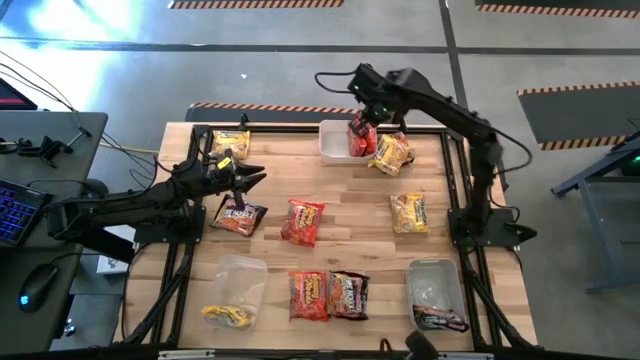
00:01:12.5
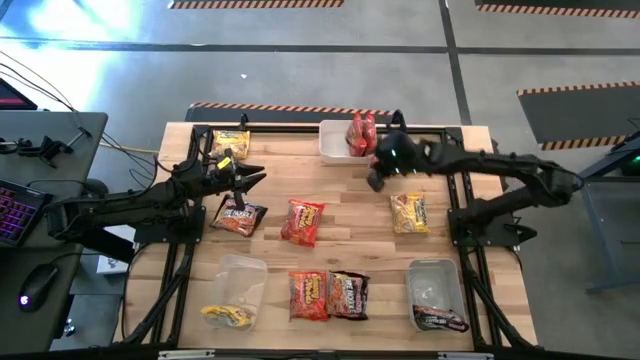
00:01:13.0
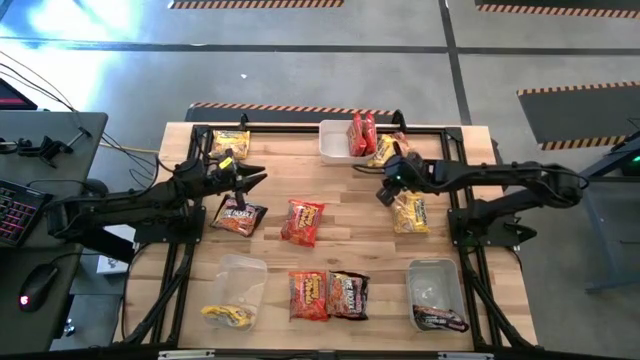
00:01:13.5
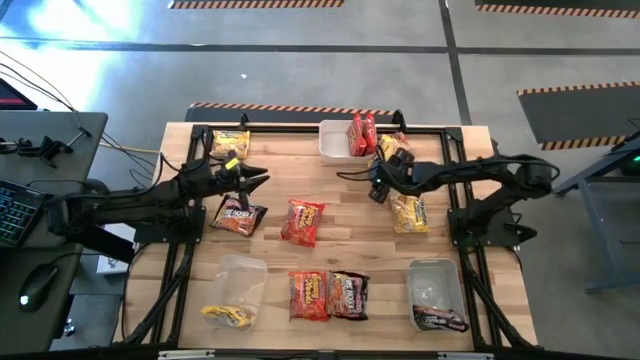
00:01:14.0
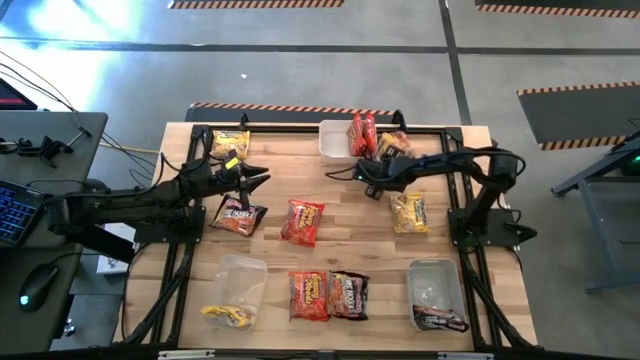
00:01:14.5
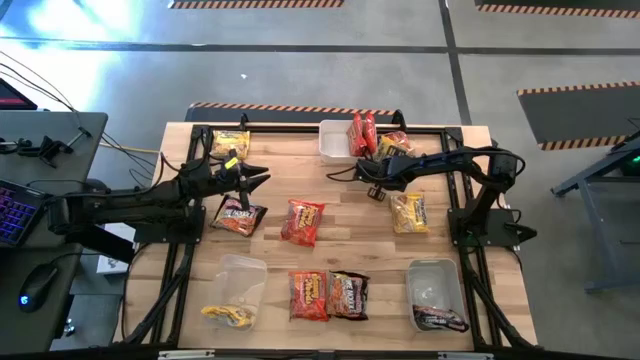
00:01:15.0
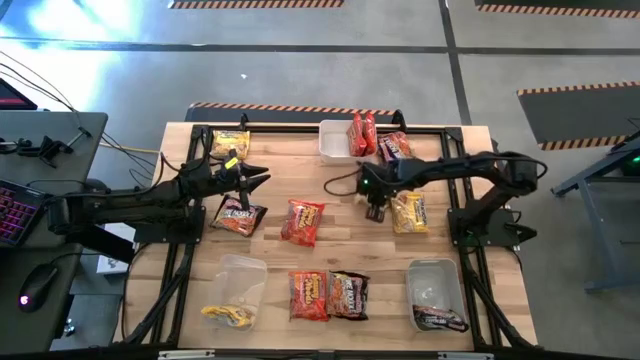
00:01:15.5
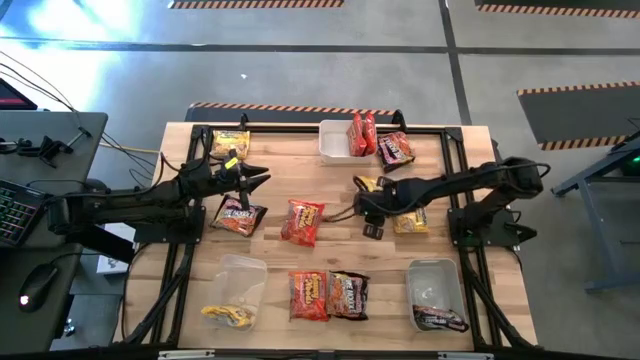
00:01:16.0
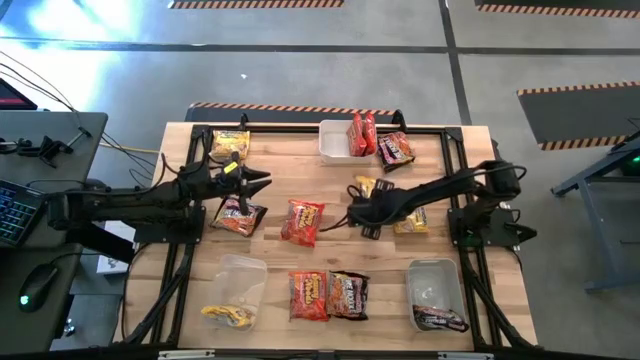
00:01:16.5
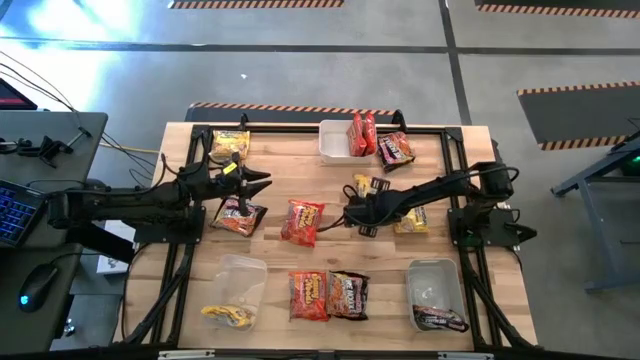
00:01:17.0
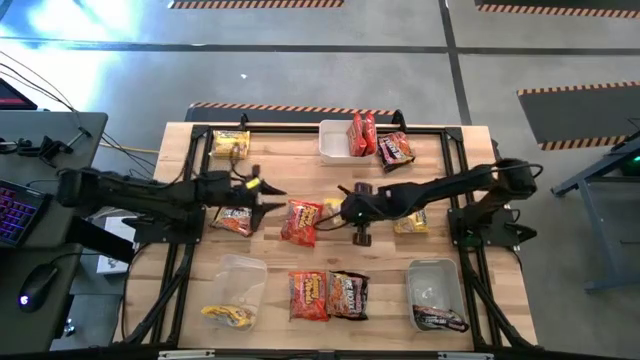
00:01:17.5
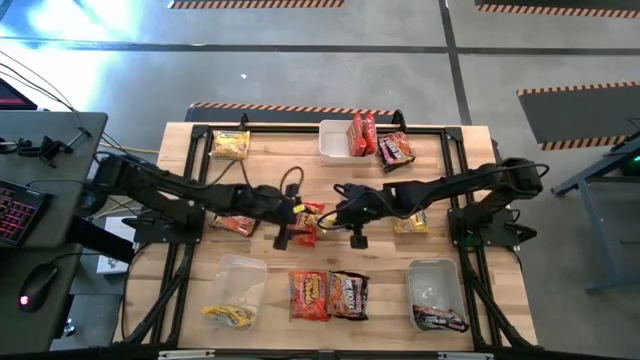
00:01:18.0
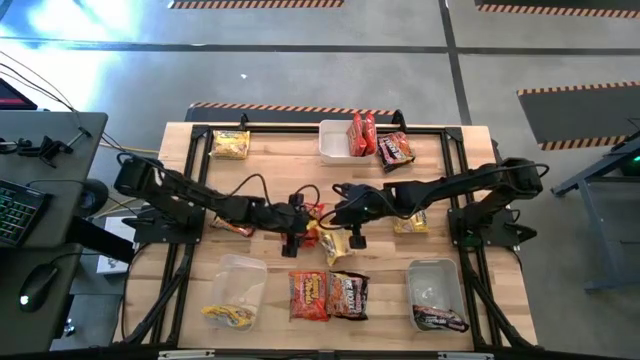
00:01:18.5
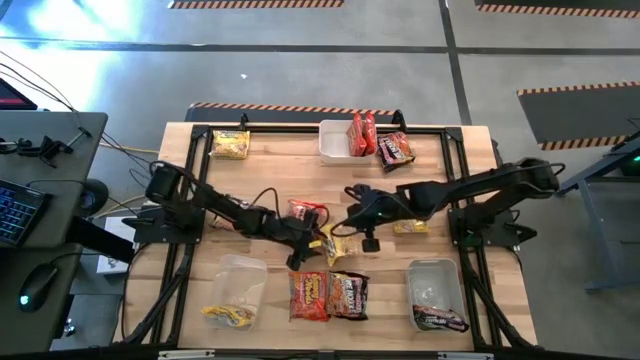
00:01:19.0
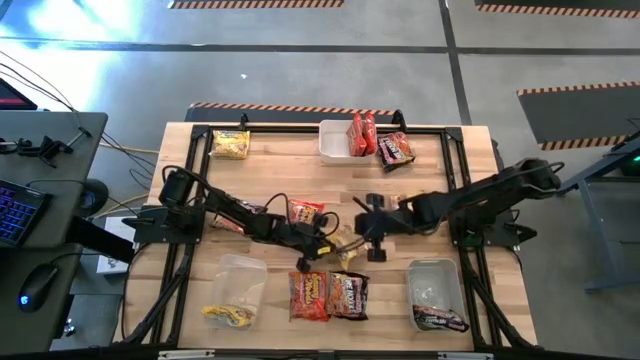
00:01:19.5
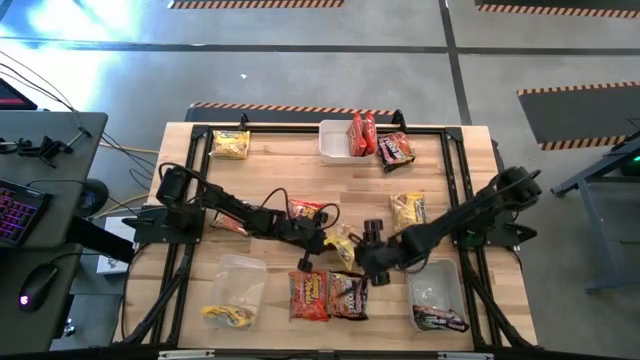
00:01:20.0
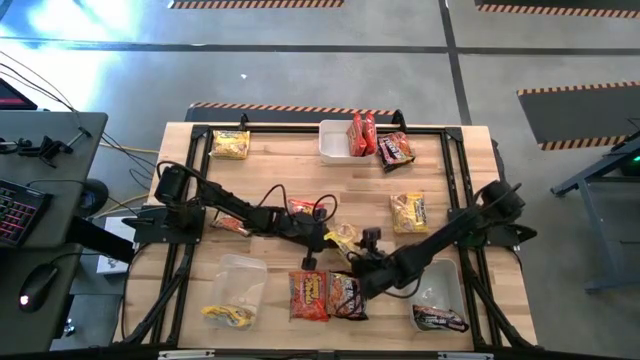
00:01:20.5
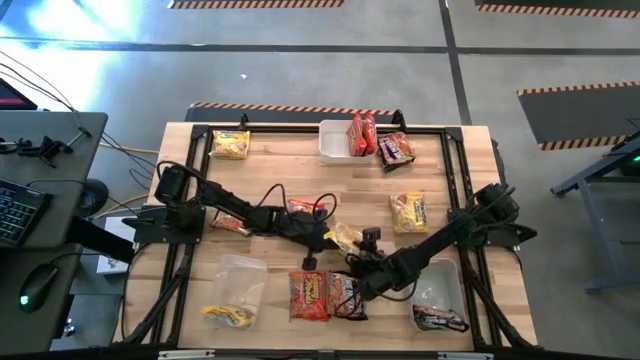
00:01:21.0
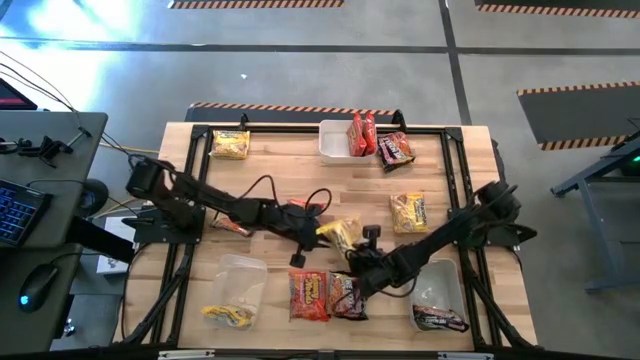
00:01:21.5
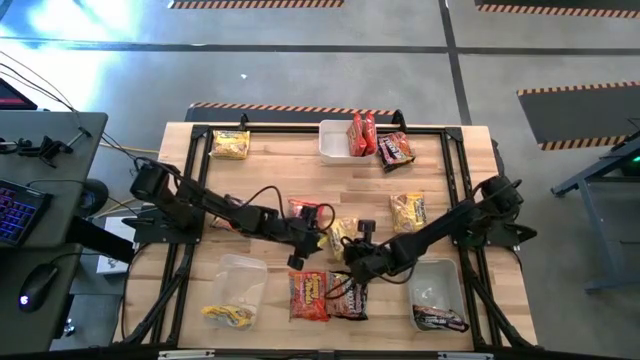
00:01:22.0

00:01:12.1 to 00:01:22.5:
Task: Sort Maruchan noodles
Put the yellow noodle pack into the transparent bin

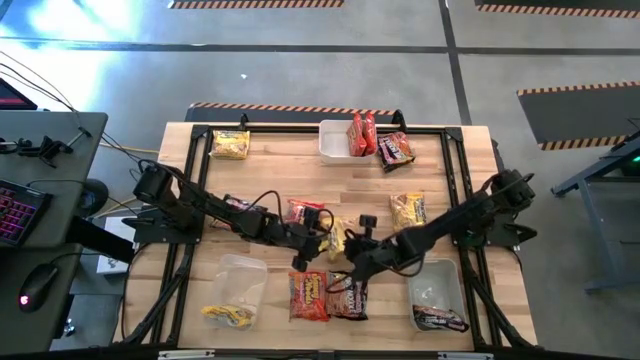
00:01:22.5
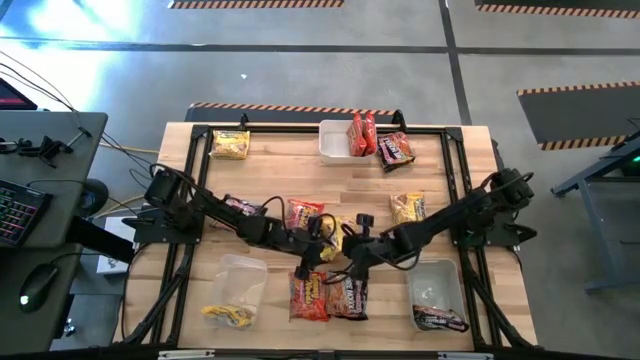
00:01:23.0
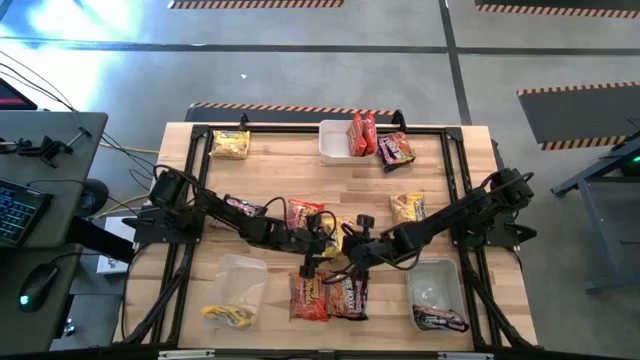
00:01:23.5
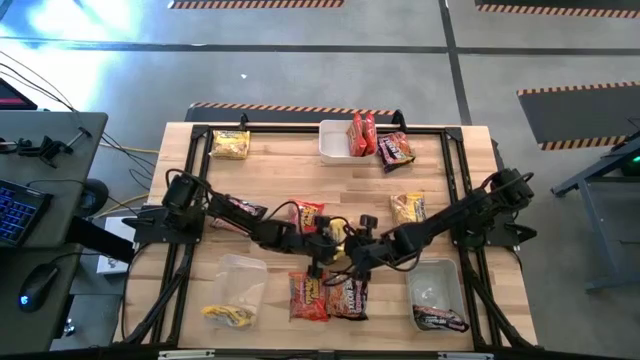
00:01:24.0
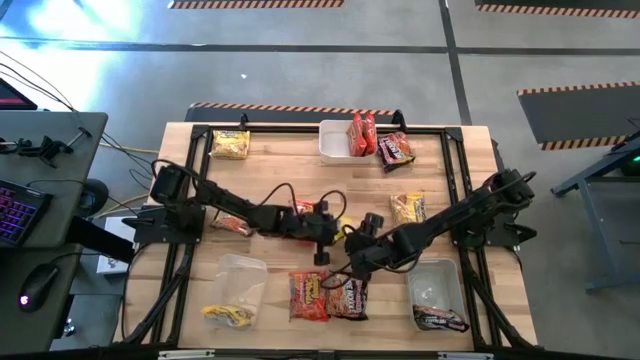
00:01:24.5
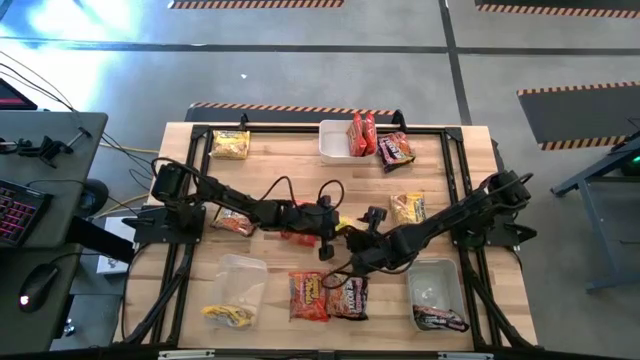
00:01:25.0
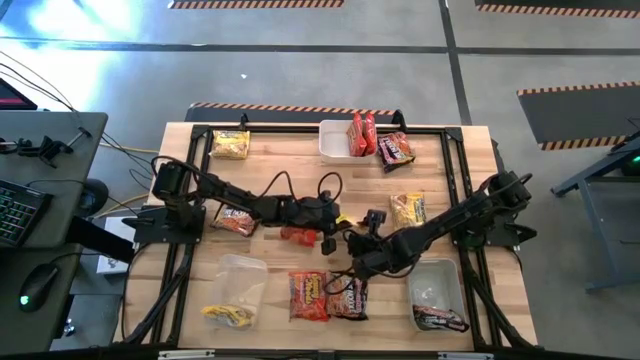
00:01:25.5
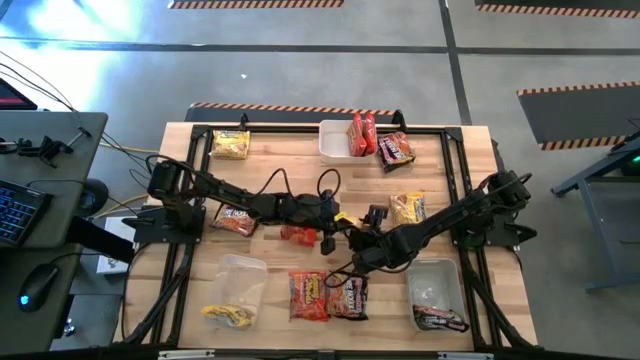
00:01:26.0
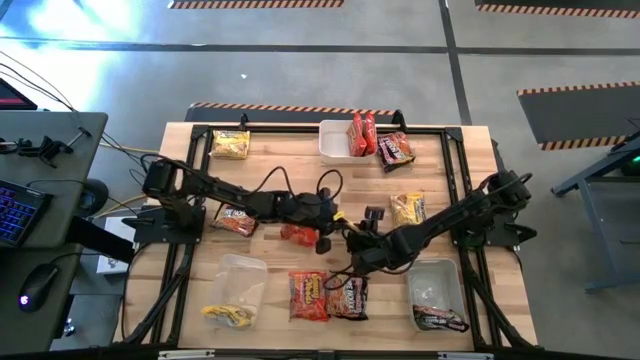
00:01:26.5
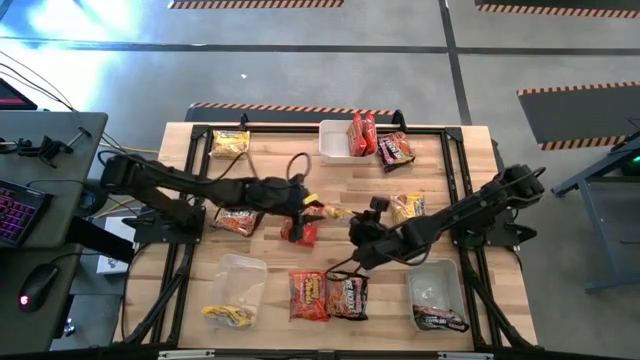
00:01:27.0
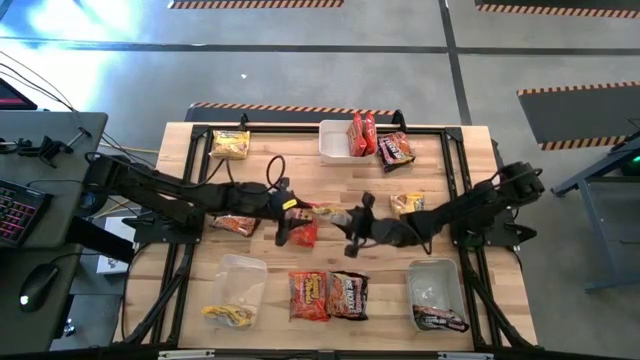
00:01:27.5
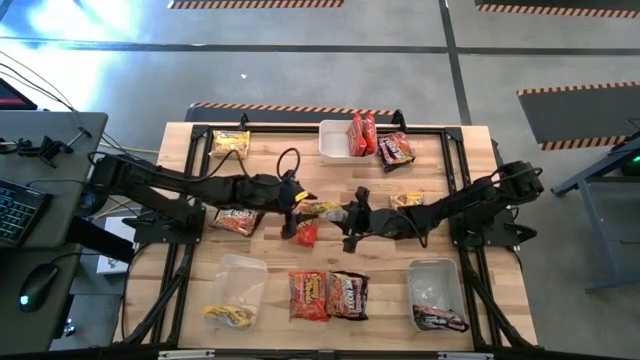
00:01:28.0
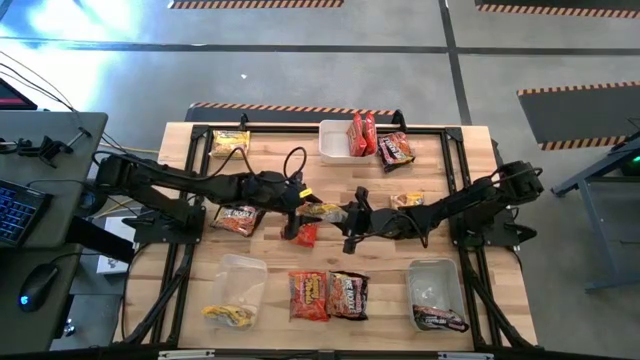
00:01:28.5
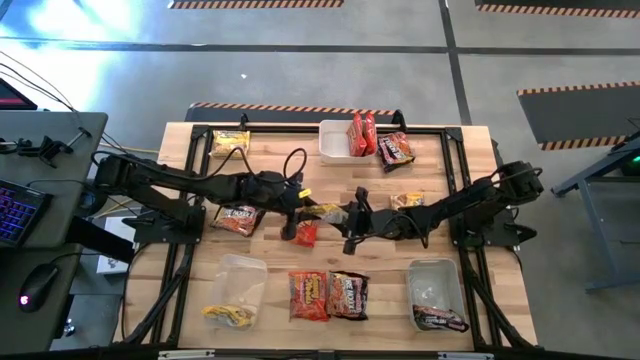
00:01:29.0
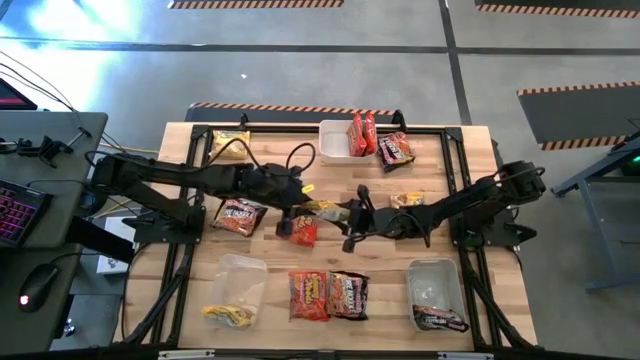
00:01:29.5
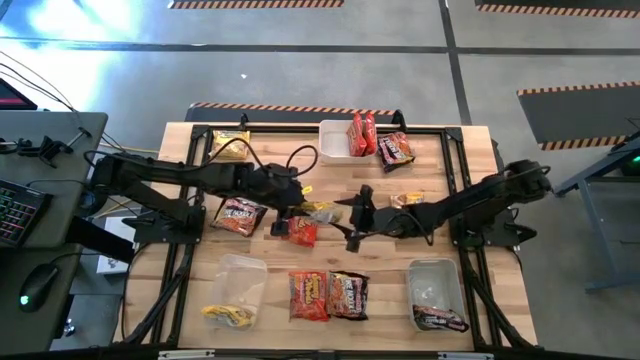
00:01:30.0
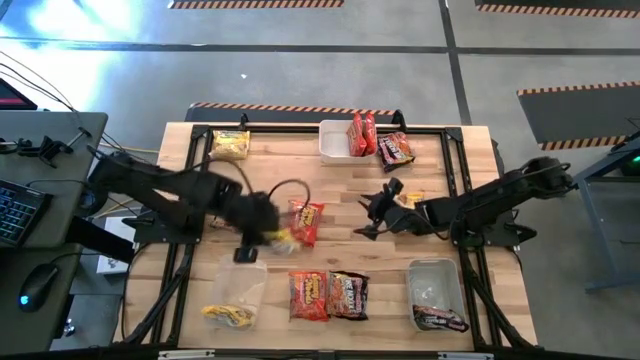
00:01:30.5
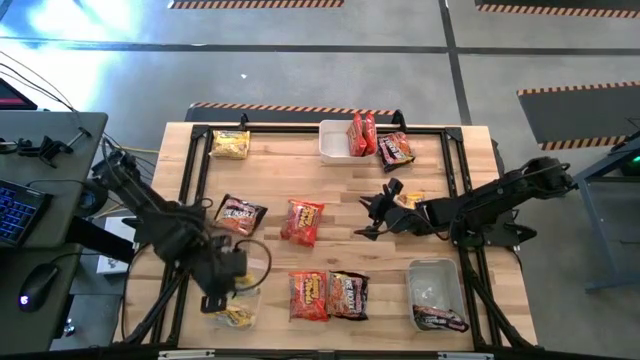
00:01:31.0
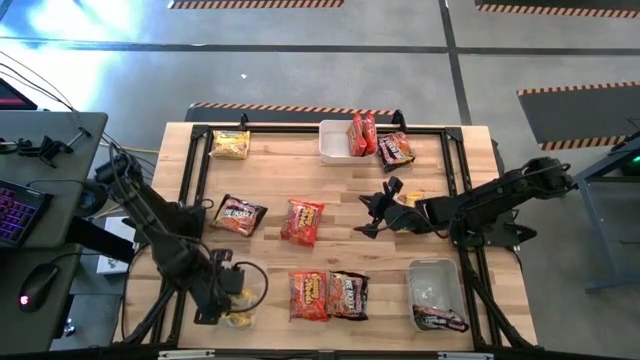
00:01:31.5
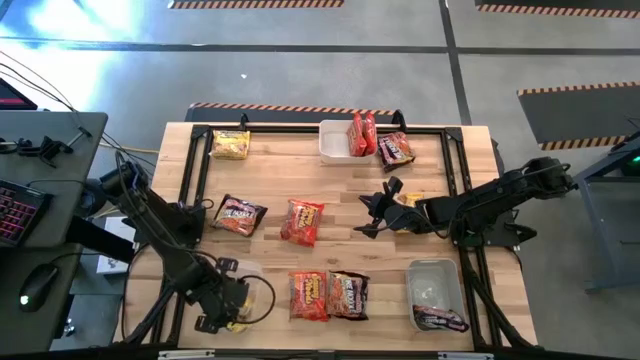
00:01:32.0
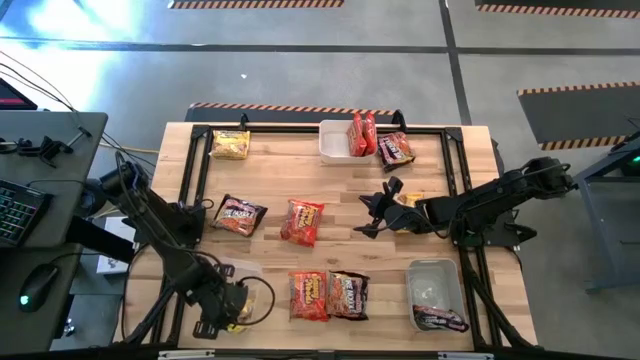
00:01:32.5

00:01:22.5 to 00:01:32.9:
Put the yellow noodle pack into the transparent bin

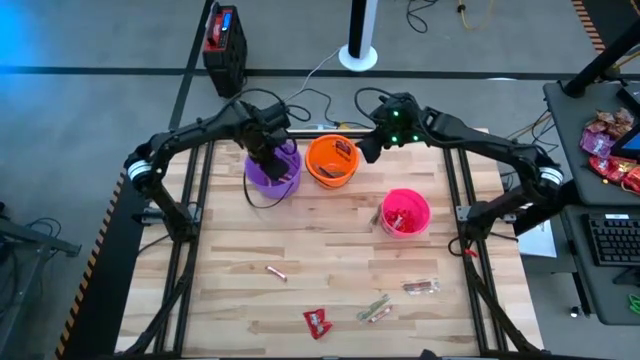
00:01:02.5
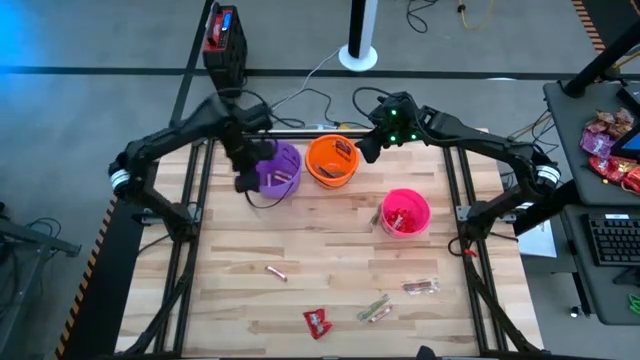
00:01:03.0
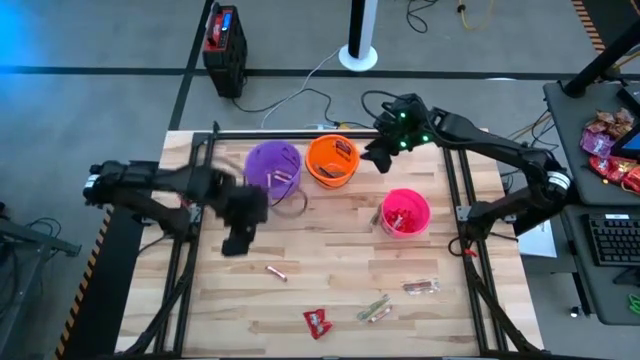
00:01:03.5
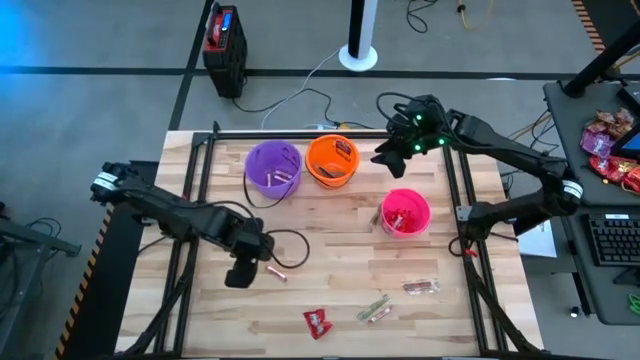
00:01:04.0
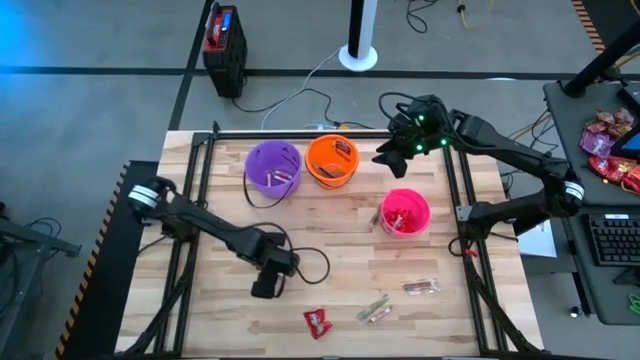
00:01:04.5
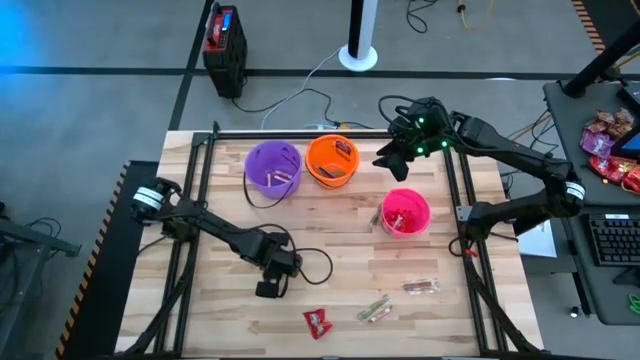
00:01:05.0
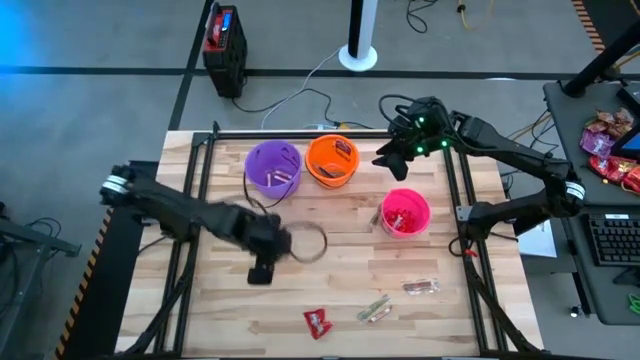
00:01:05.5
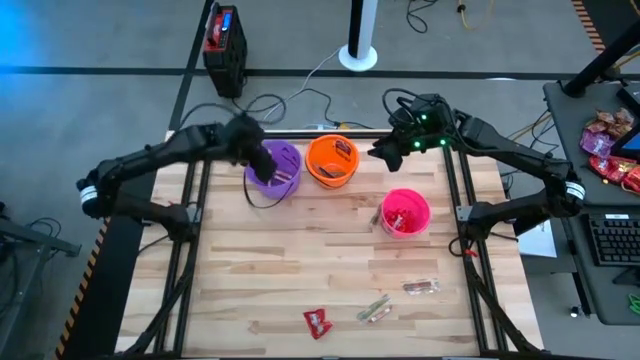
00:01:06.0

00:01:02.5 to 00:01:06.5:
Task: Sort candy by brand, put in halloween buckets
Put the white candy into the violet bucket
